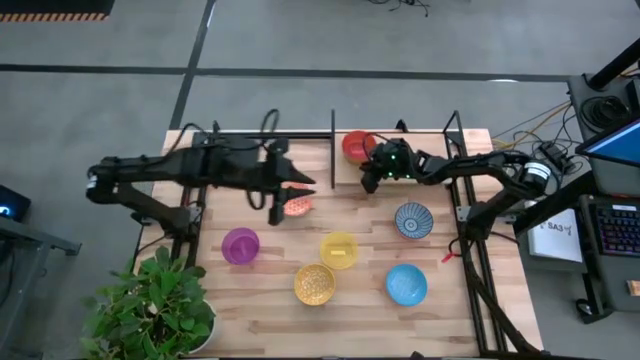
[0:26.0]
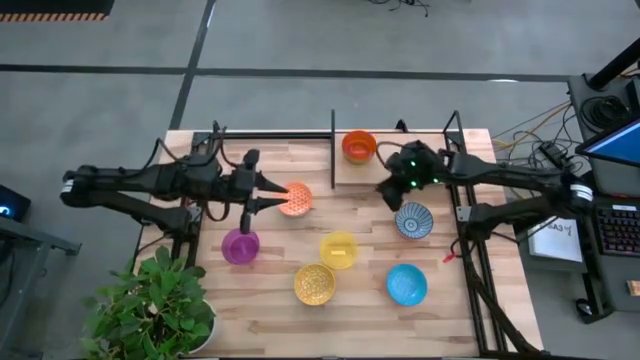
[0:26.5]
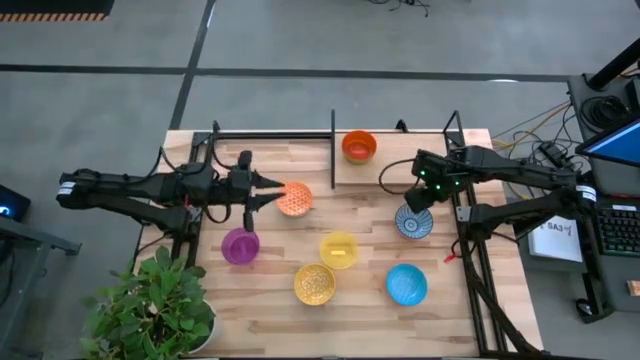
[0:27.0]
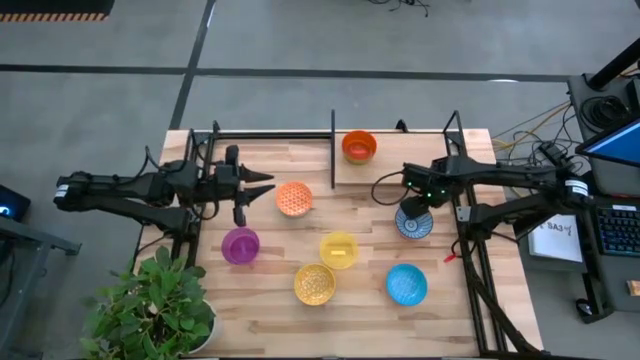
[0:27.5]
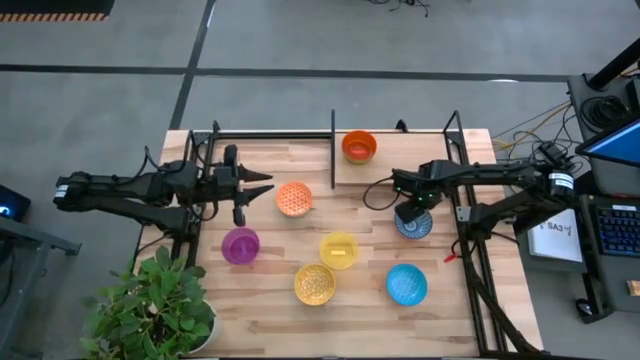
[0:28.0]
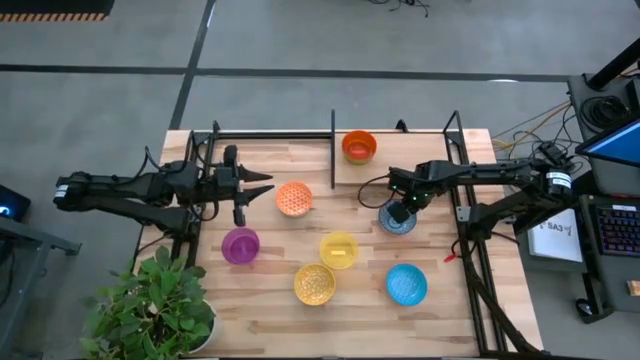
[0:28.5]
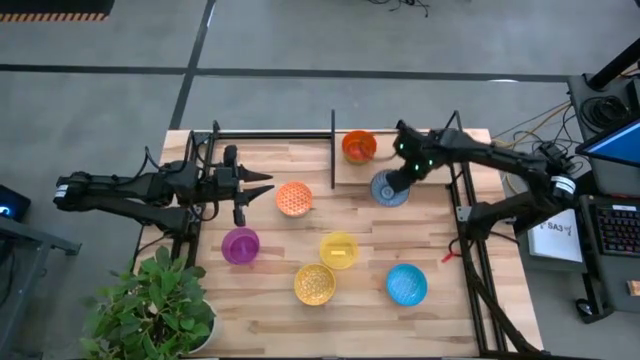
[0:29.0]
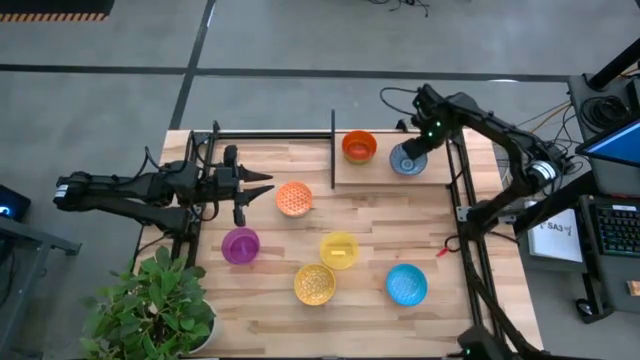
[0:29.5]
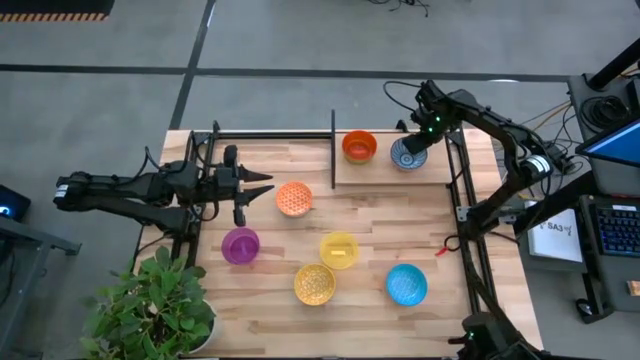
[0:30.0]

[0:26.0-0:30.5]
Task: Place and stack bowls onto a shelf
Put the dark blue patterned bowl on the shelf

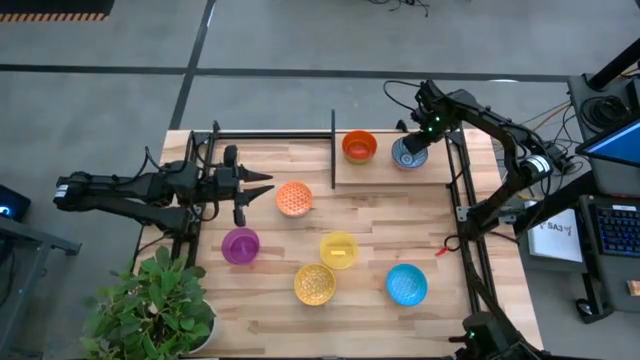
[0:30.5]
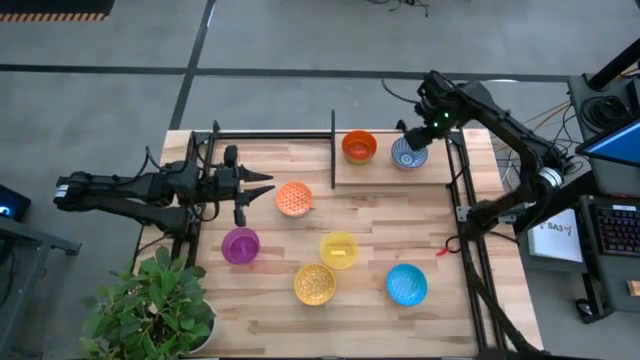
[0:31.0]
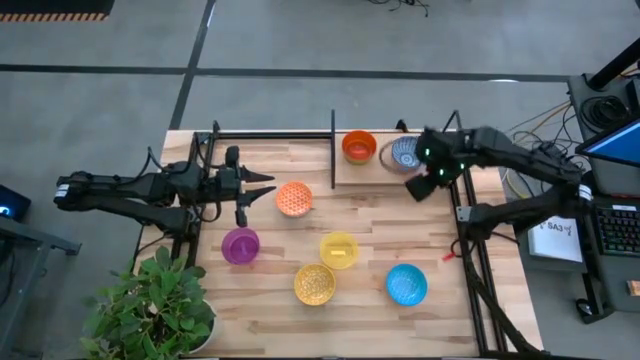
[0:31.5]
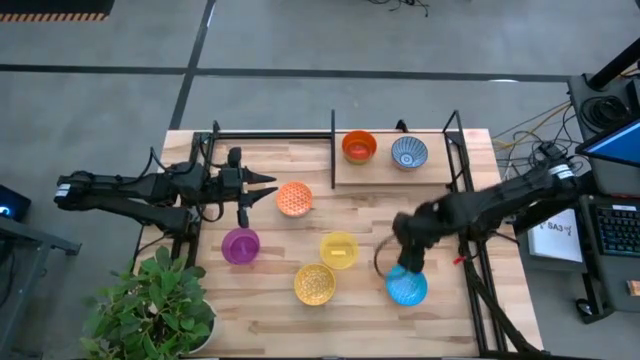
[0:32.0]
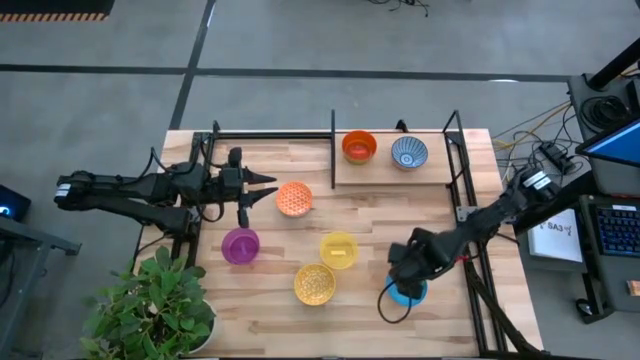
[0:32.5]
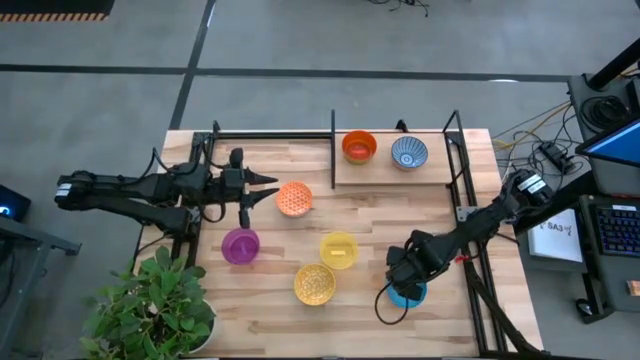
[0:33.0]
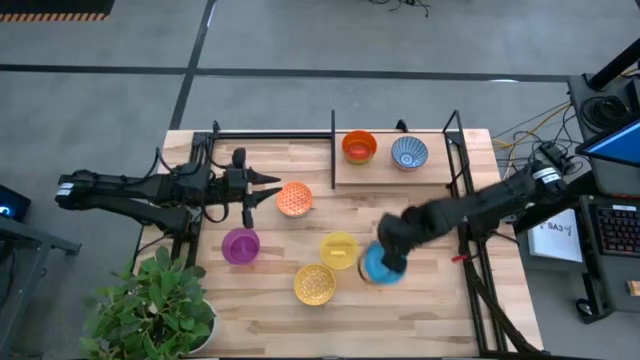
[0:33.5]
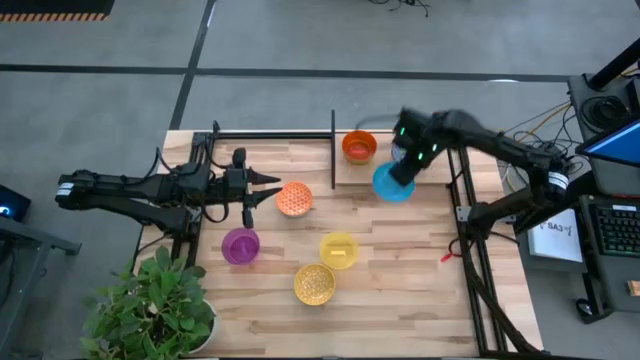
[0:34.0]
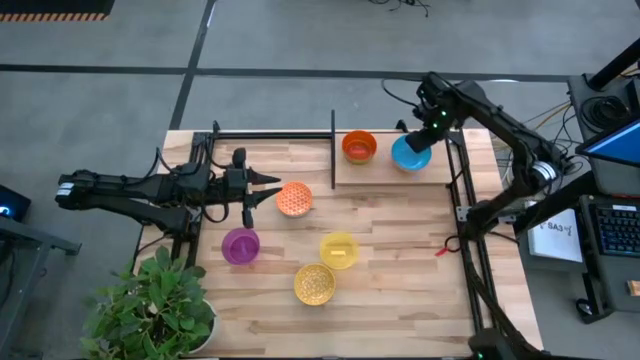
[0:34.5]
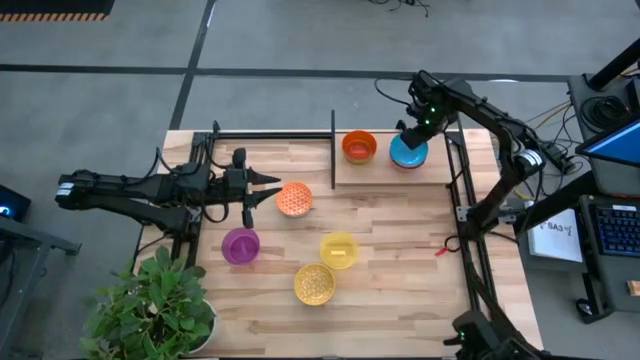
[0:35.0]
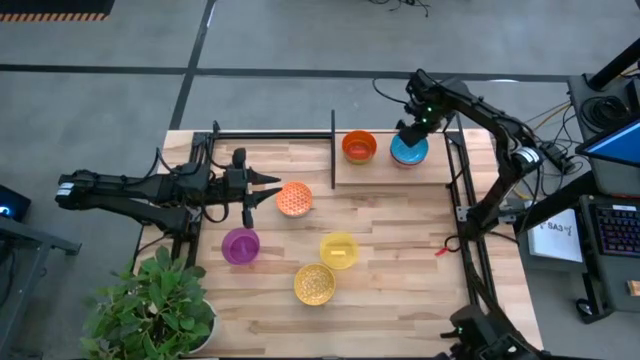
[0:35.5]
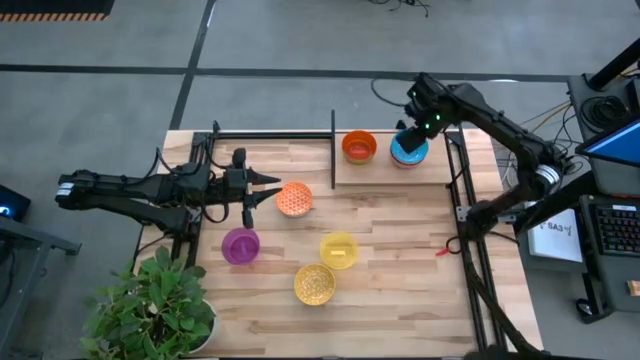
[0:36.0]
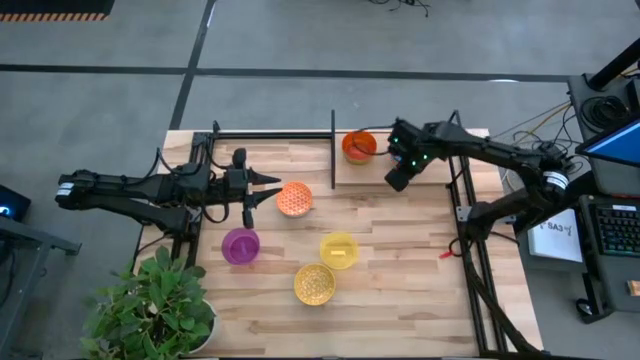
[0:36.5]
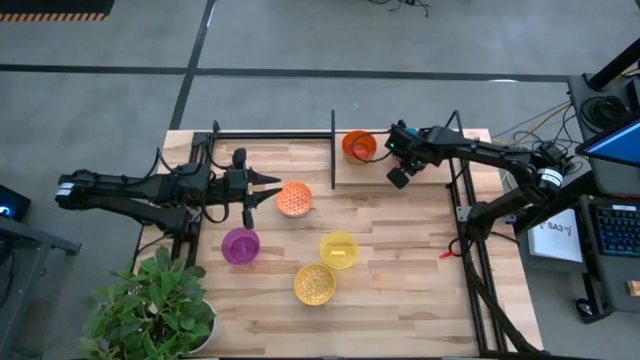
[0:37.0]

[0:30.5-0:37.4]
Stack the blue patterned bowl on top of the dark blue patterned bowl the shelf

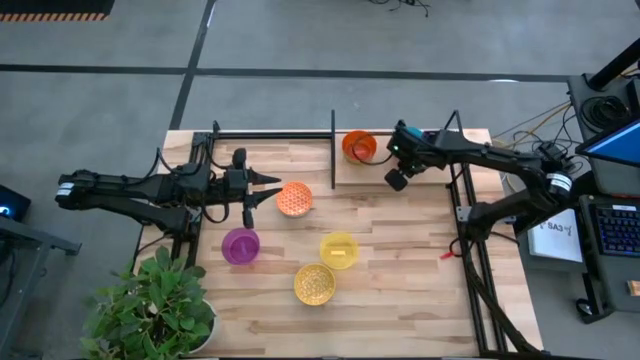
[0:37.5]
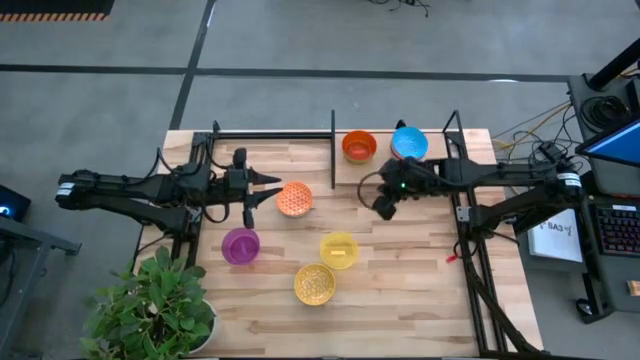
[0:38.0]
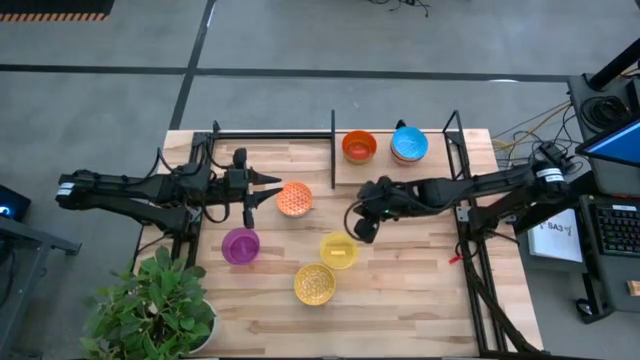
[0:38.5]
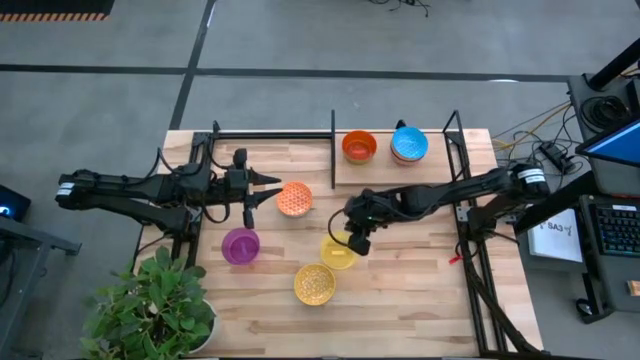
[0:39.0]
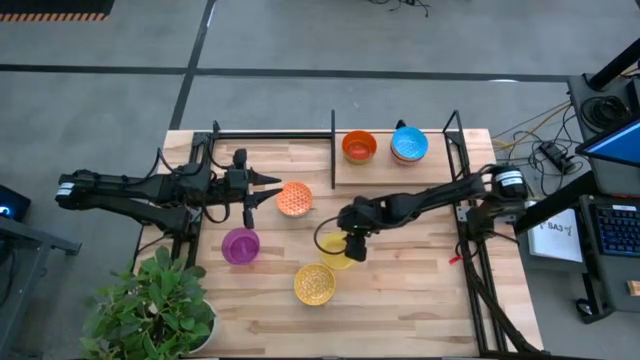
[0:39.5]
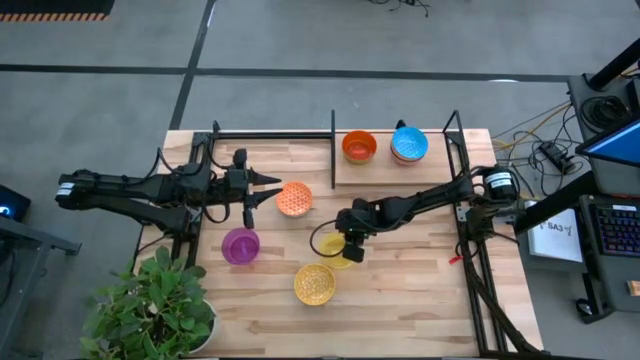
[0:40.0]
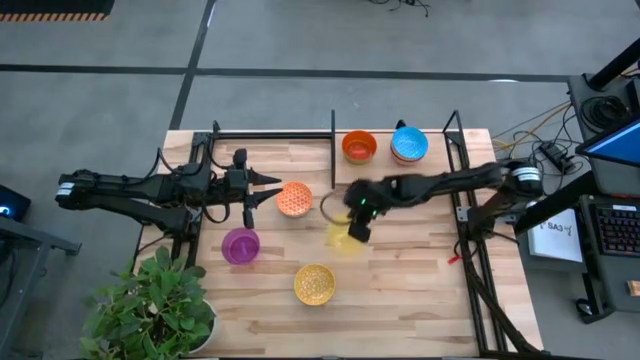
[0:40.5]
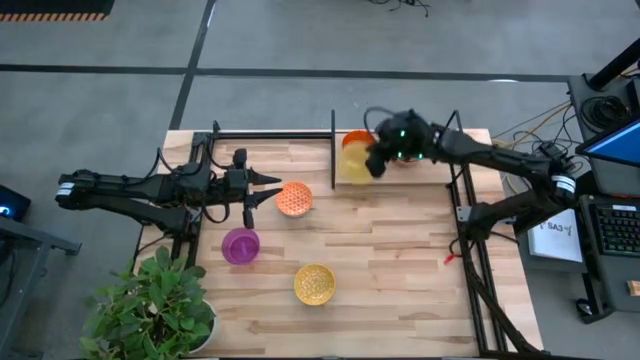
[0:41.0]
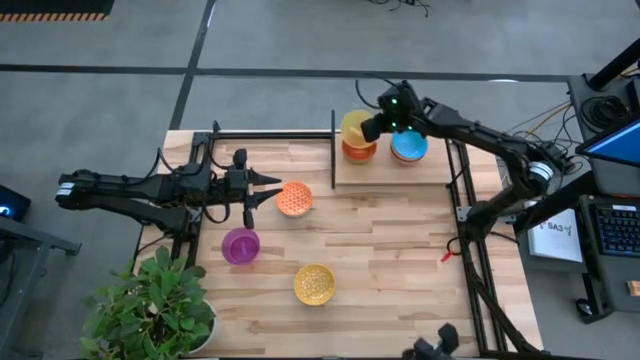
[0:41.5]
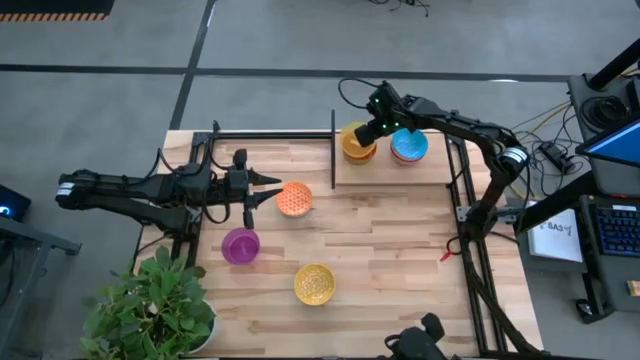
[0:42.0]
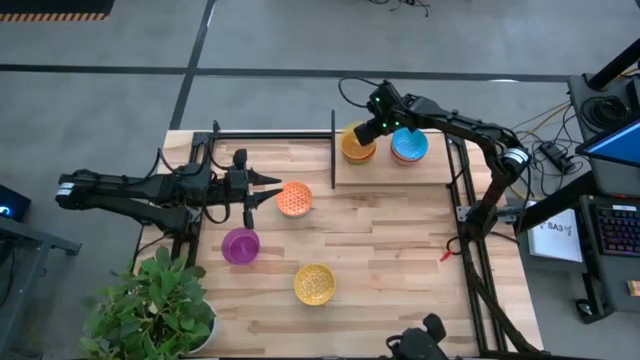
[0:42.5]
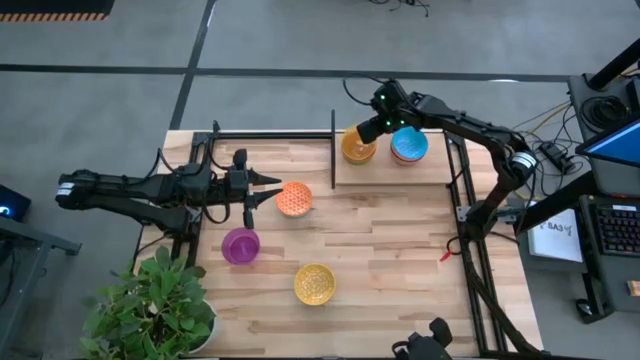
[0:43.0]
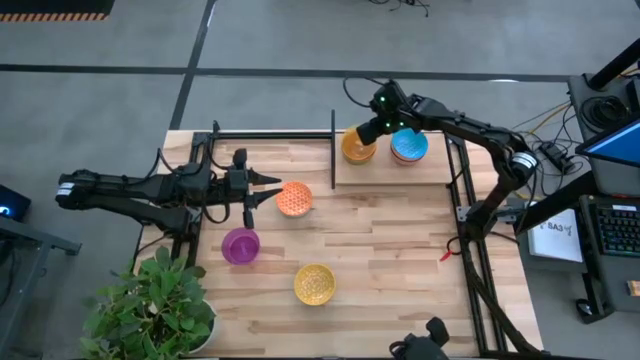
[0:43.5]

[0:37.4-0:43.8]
Stack the yellow bowl on top of the orange bowl on the shelf

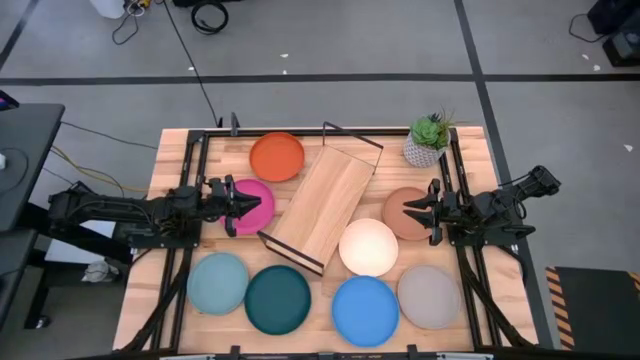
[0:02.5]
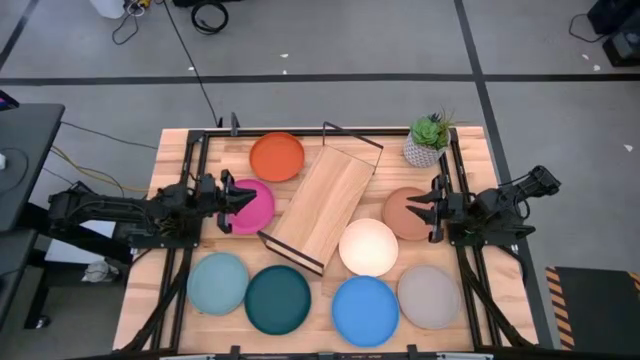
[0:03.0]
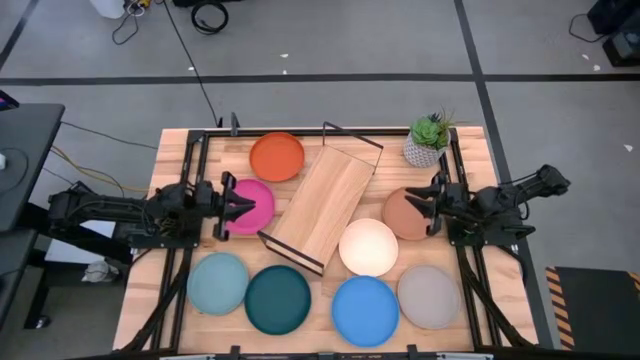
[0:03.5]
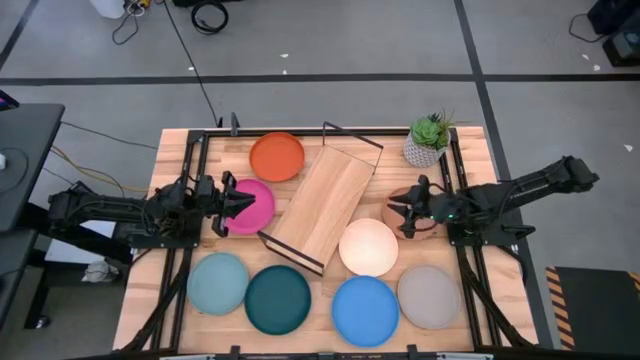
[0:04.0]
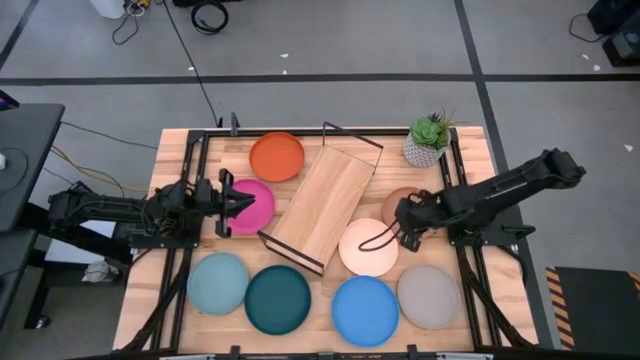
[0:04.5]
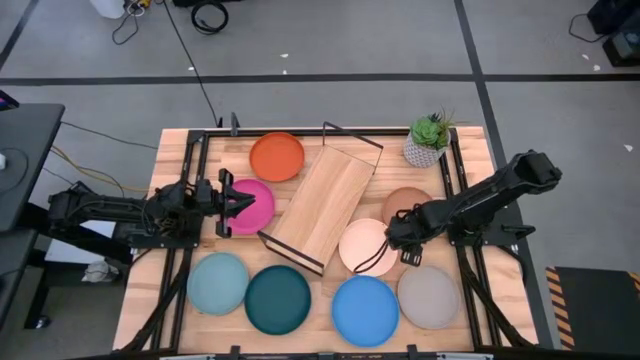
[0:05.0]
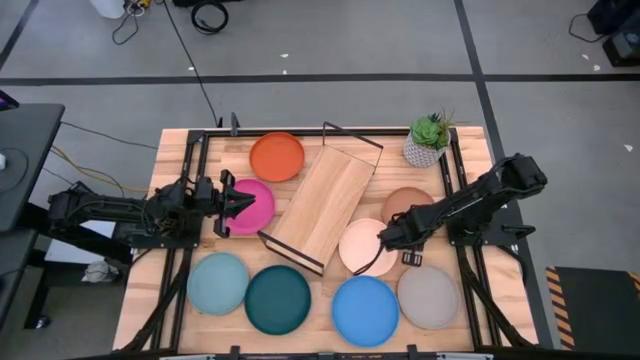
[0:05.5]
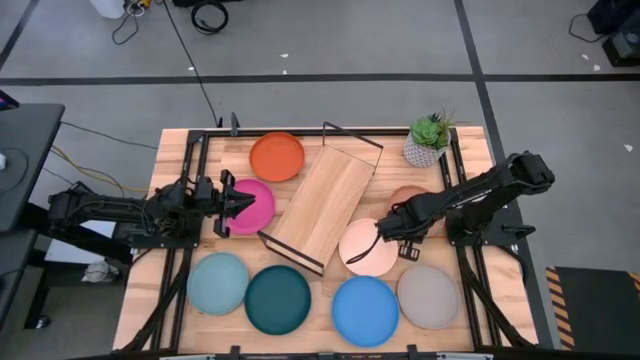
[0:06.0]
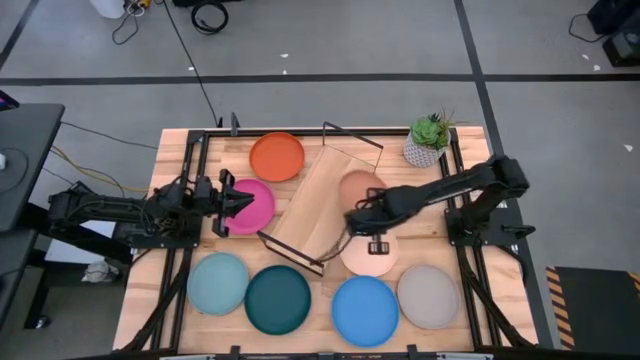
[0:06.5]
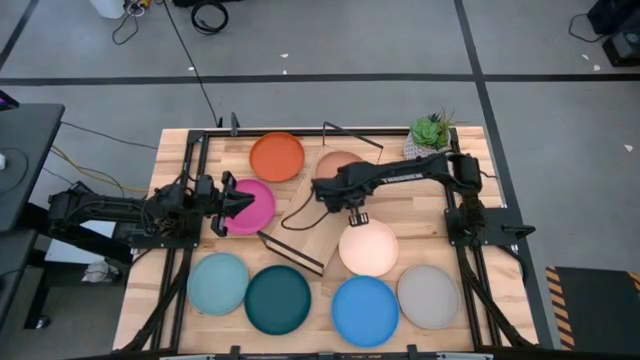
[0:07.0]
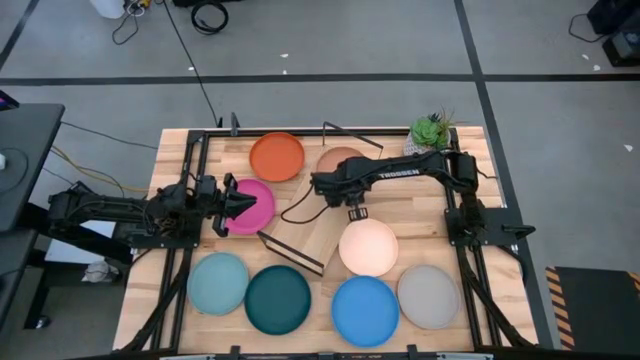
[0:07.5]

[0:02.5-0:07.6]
Task: Place and stack plates onto a shelf
Put the brown plate on the shelf
